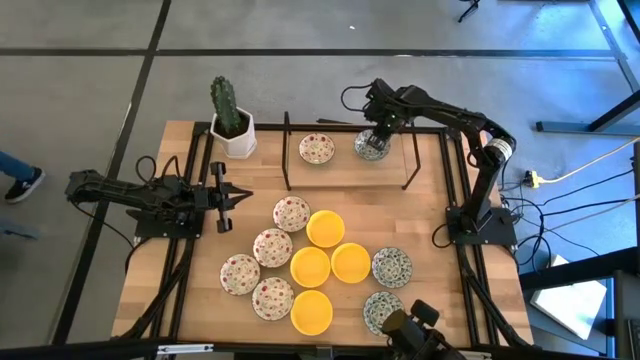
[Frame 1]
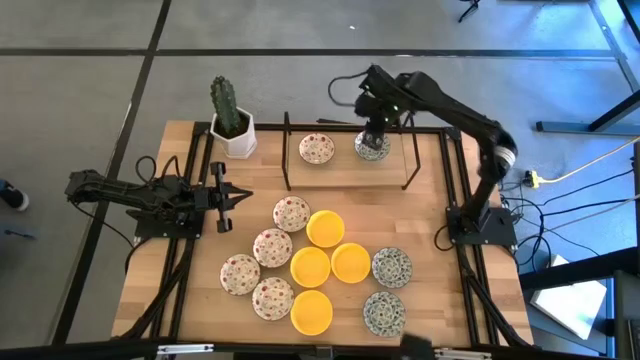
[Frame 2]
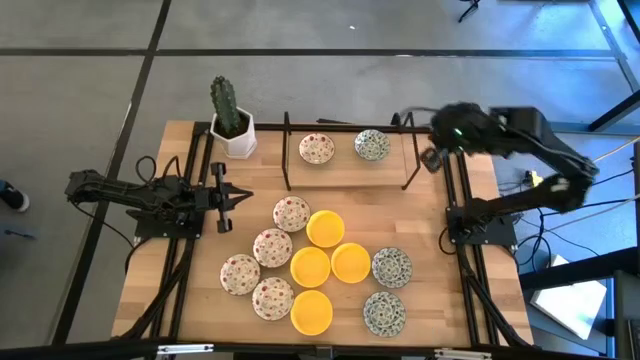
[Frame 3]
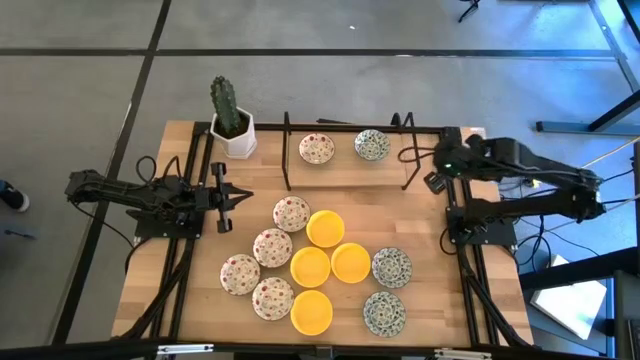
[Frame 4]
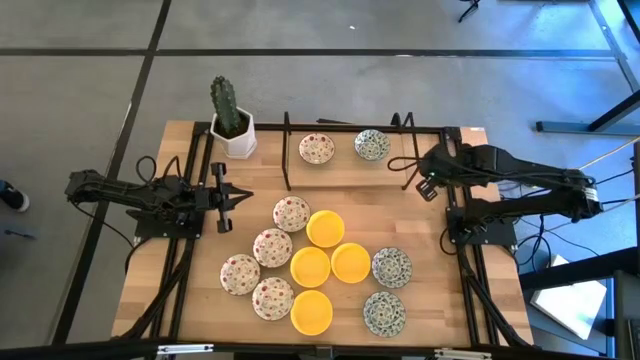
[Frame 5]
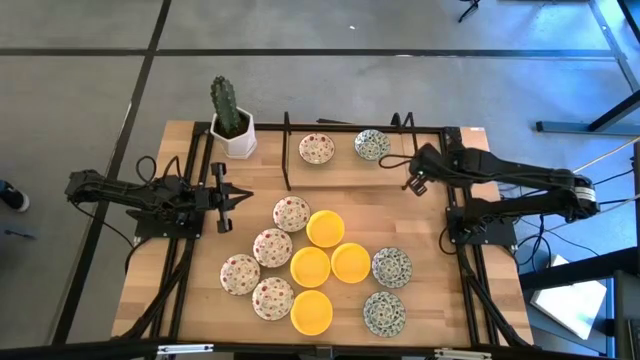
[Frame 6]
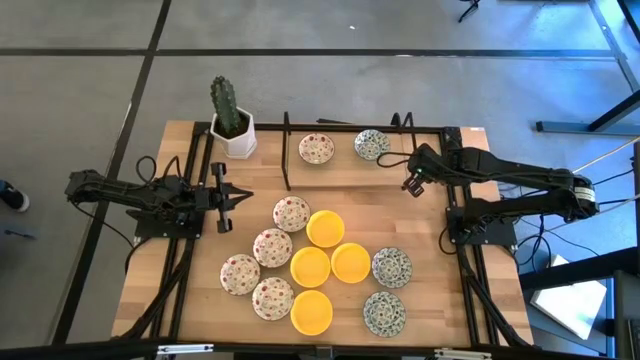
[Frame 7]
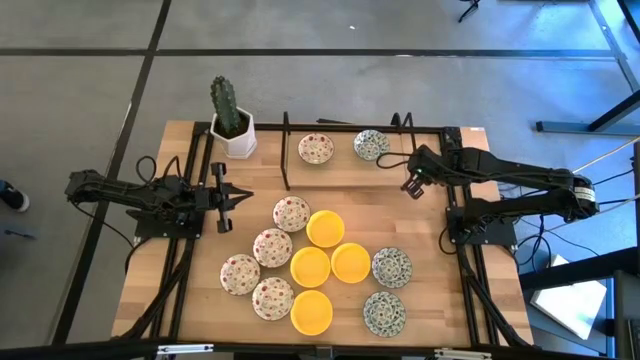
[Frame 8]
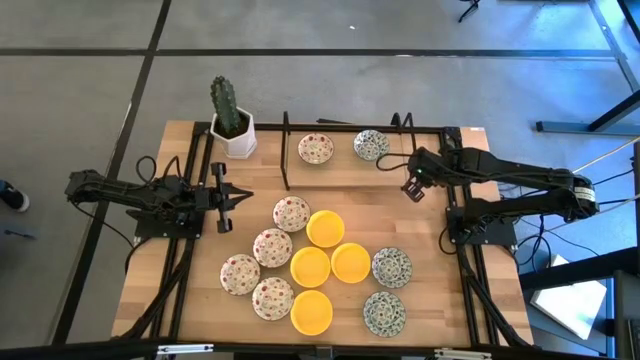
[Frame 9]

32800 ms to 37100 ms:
Task: Pick & Place Mini bowls
Adjust the shelf on the table

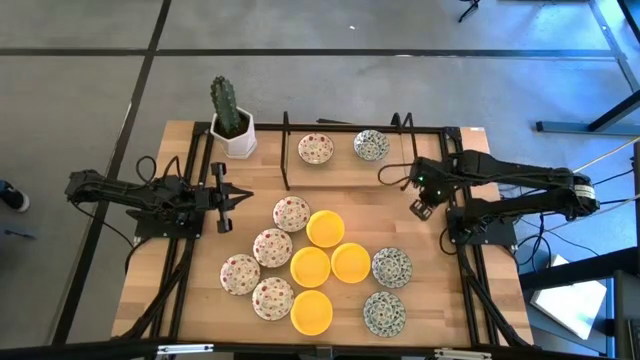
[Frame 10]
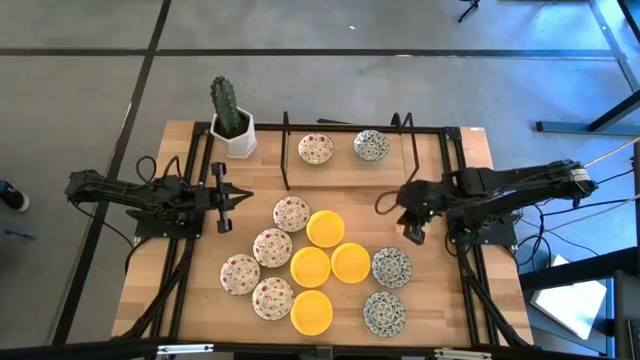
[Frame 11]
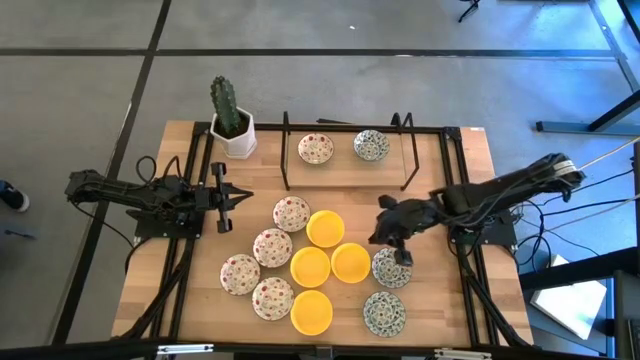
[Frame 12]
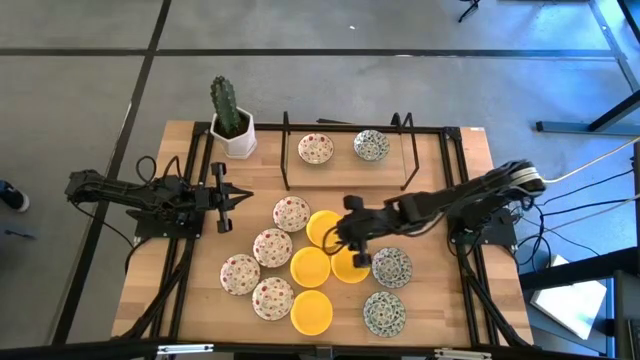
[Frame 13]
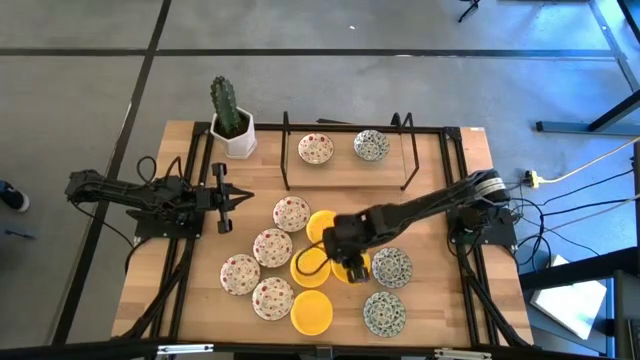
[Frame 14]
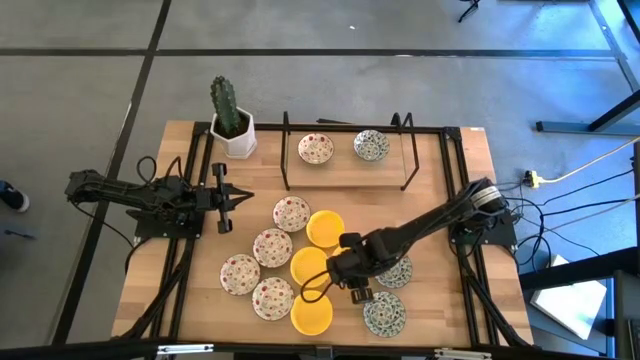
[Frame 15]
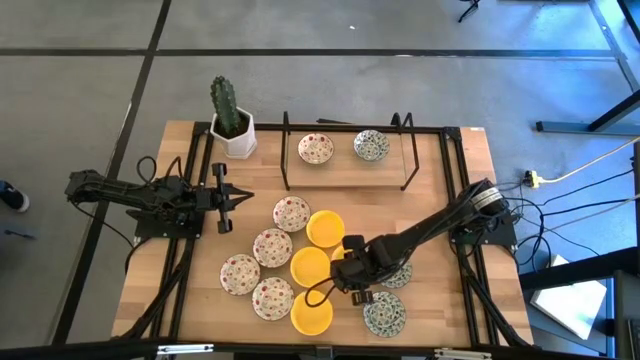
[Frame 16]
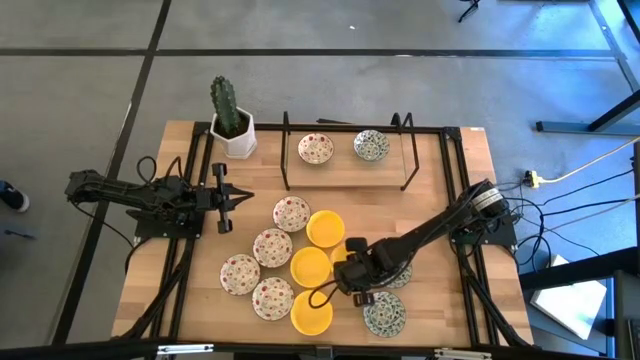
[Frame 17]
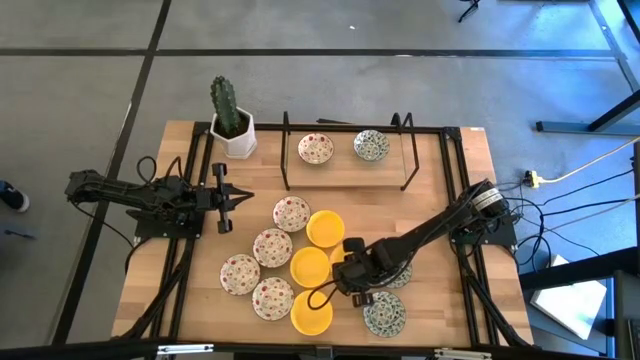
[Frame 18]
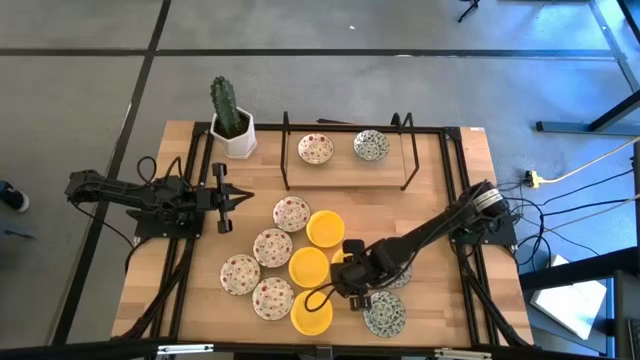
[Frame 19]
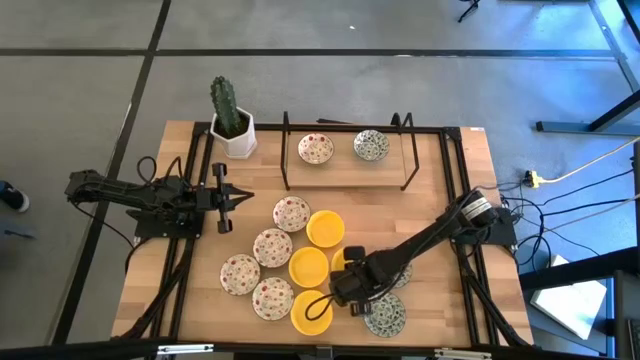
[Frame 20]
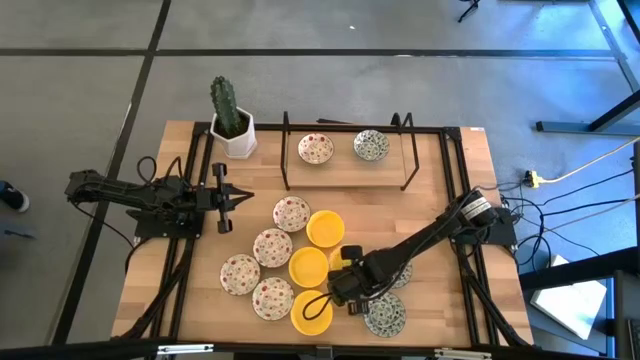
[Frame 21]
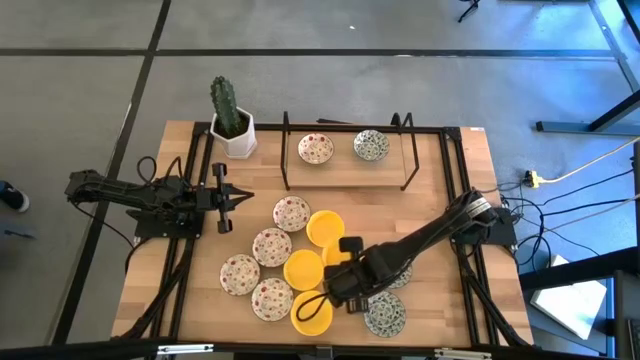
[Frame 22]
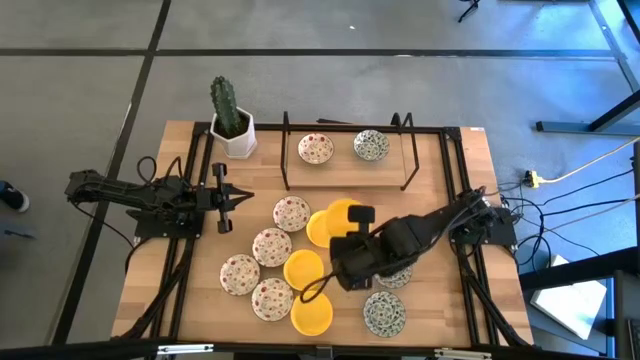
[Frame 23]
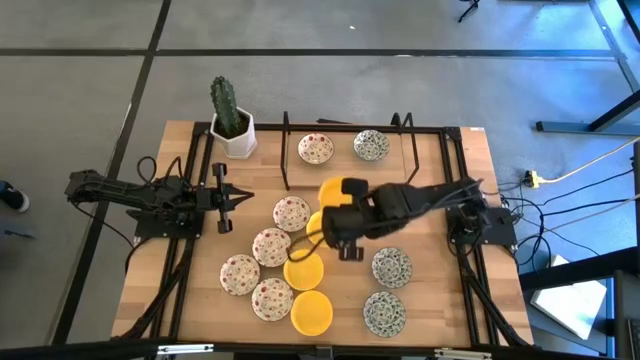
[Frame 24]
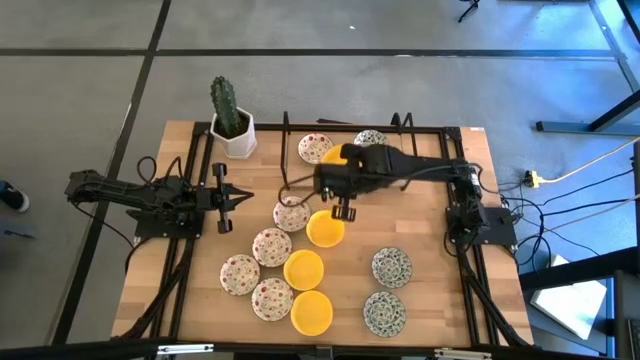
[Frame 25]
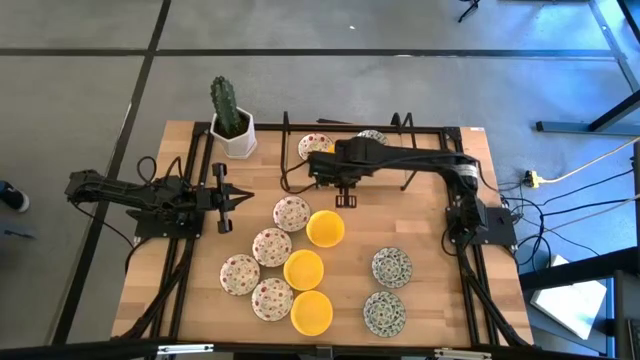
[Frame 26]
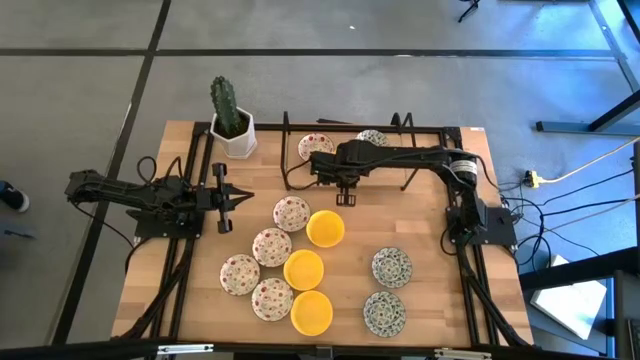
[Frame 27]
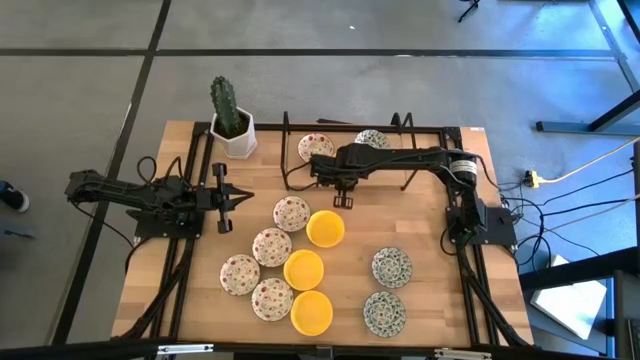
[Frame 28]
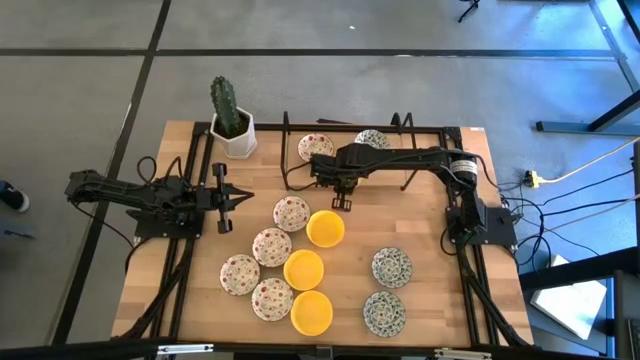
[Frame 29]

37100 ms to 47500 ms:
Put the yellow bowl on the shelf

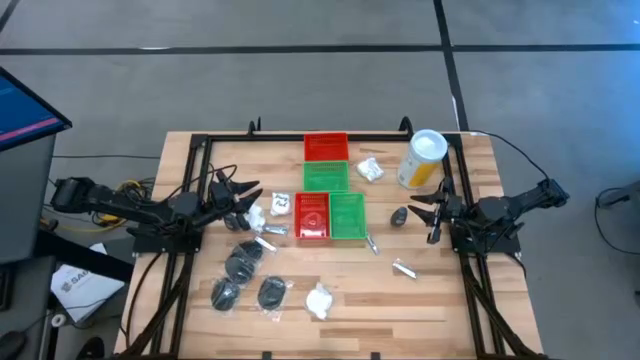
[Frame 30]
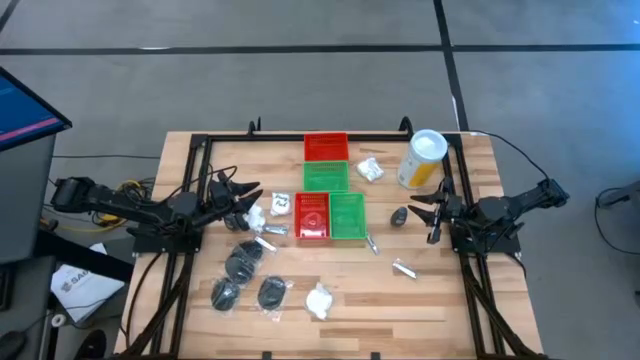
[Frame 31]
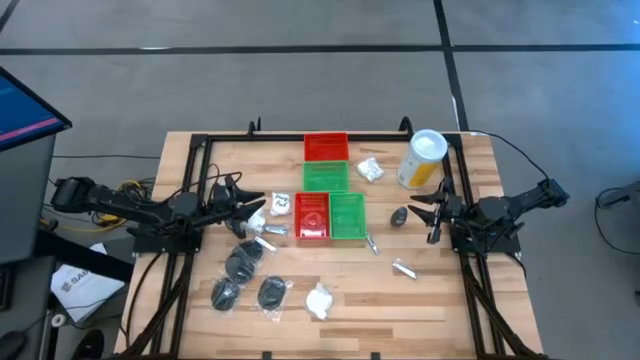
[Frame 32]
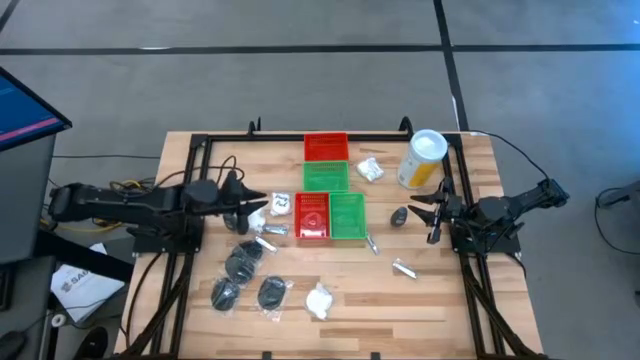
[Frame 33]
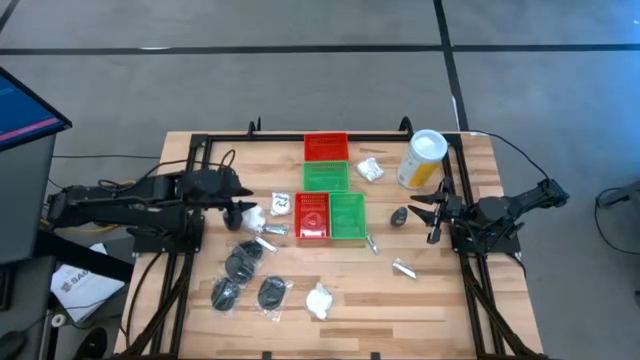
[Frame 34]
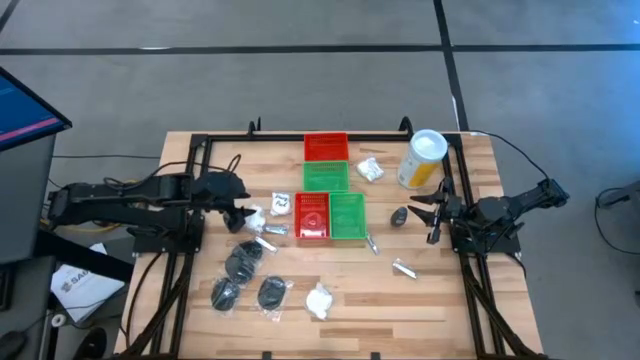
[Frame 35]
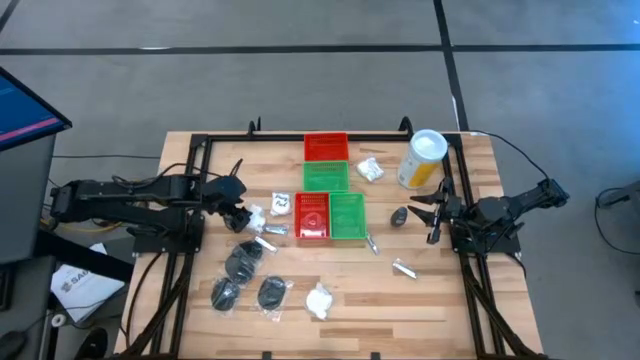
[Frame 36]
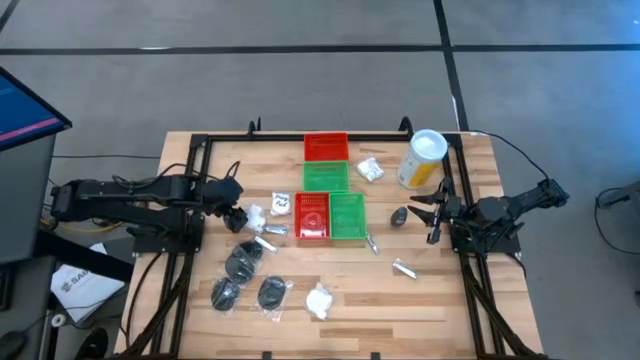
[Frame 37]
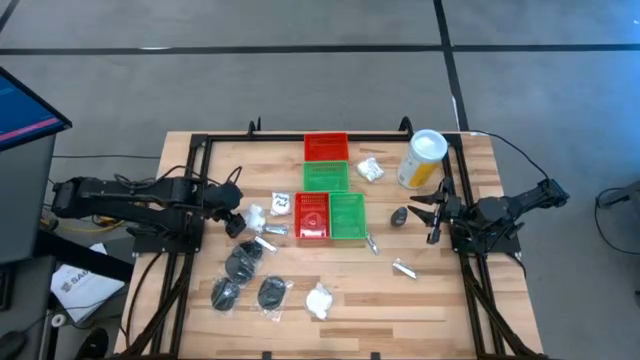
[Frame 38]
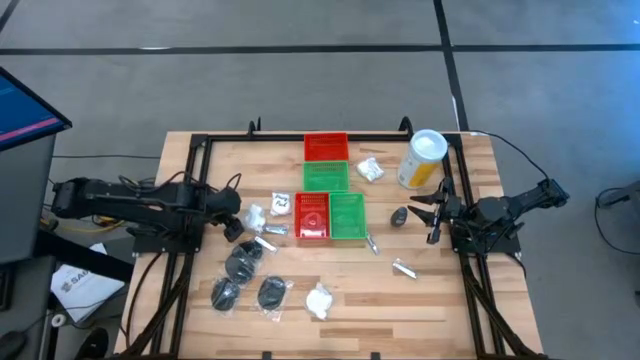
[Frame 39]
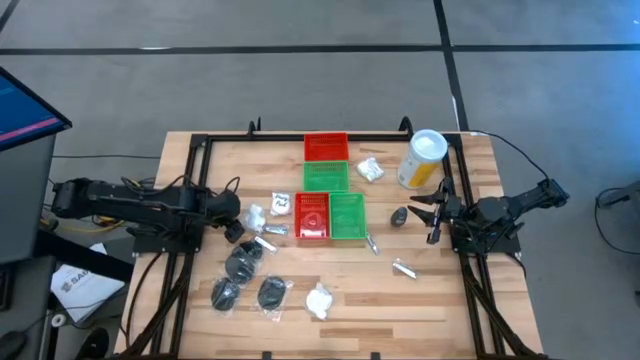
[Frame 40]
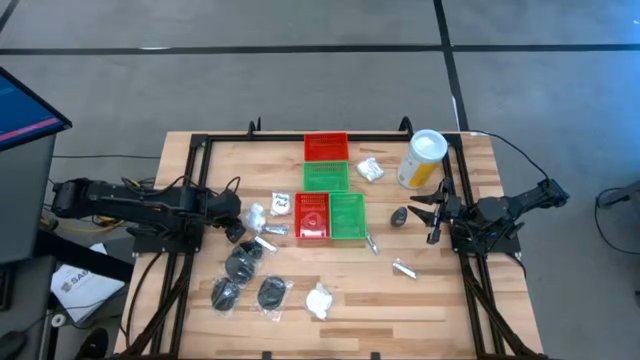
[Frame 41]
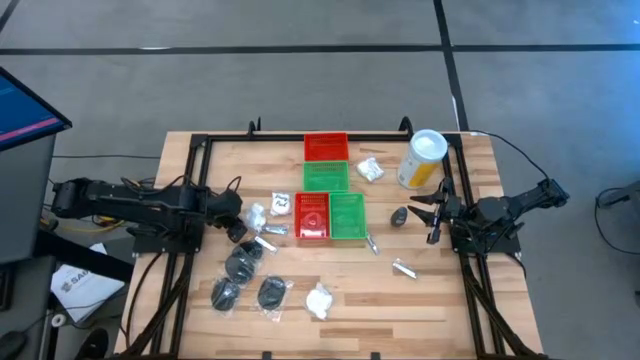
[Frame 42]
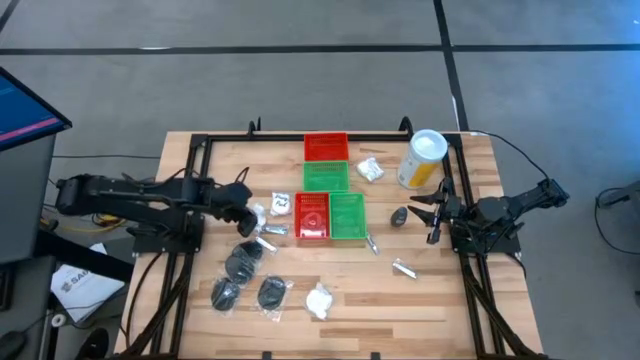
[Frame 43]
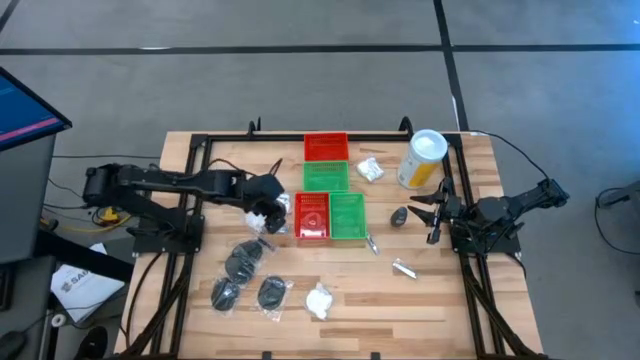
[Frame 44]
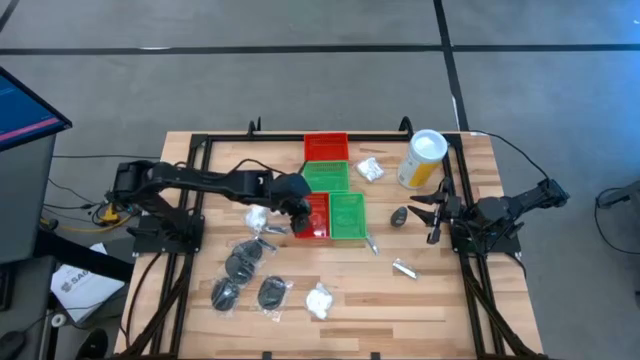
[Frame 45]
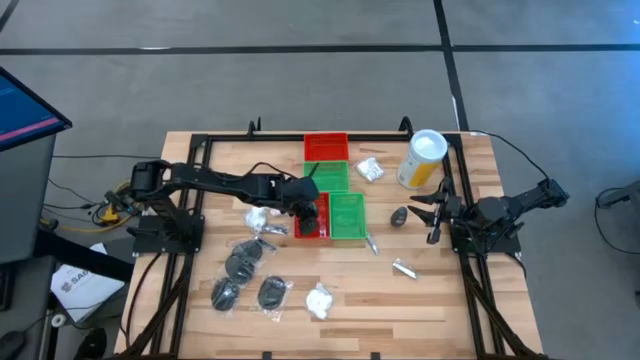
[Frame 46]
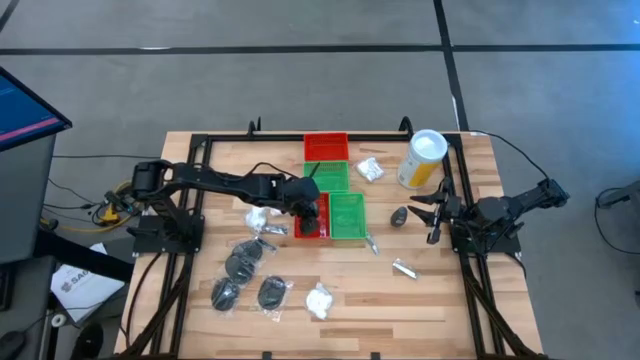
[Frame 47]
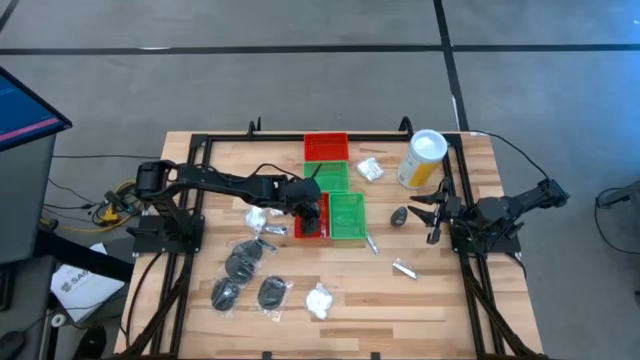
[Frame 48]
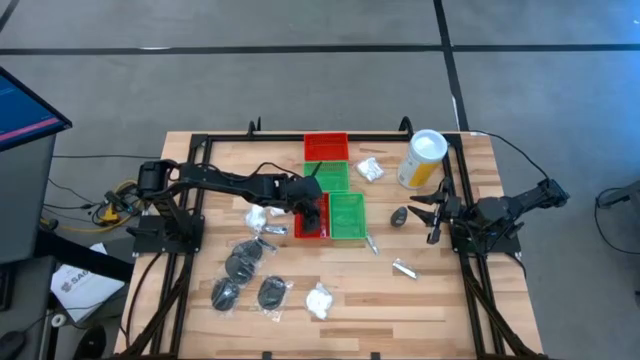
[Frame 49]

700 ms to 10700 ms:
Task: Pick & Place Travel size toiletries
Put the gray deodorant into the bottom red bin
